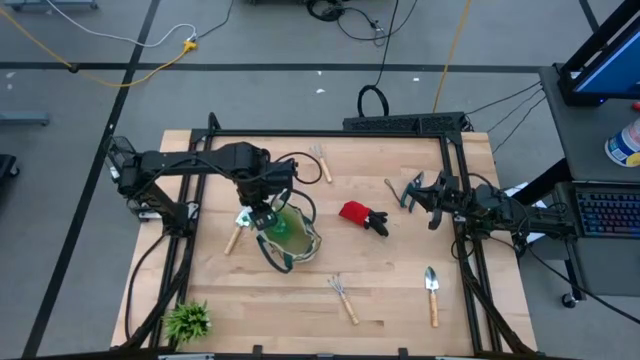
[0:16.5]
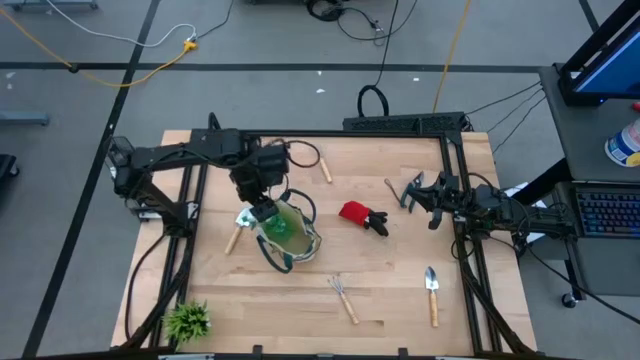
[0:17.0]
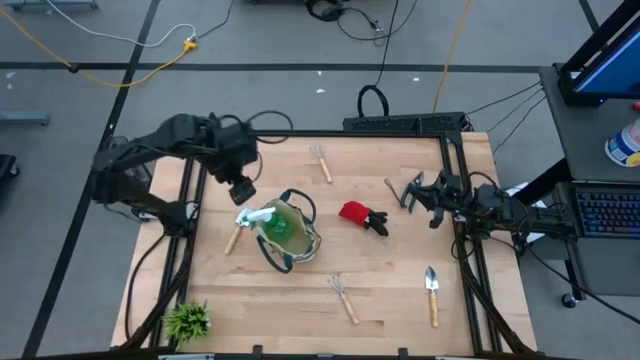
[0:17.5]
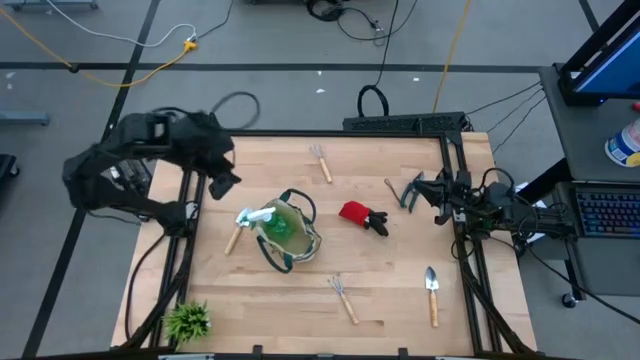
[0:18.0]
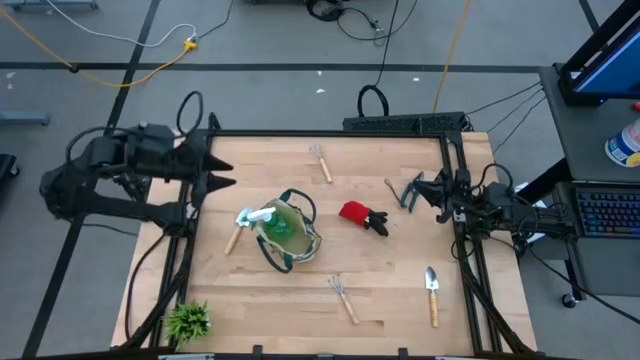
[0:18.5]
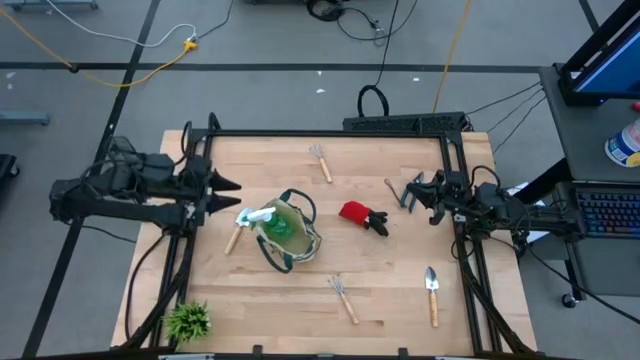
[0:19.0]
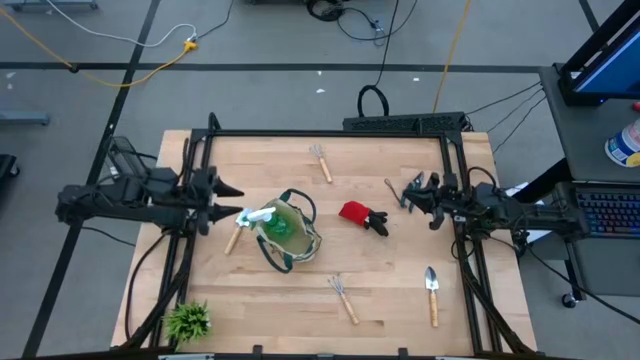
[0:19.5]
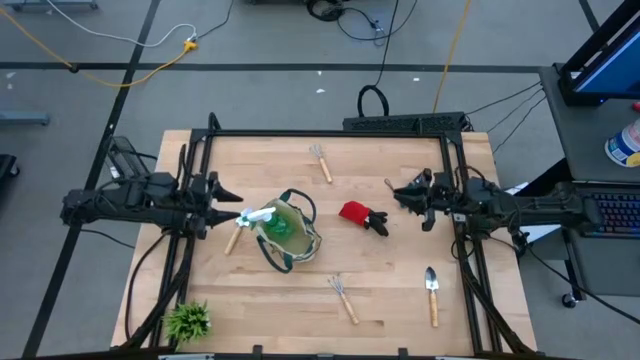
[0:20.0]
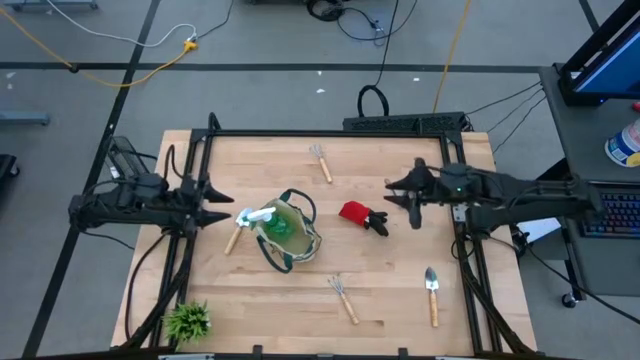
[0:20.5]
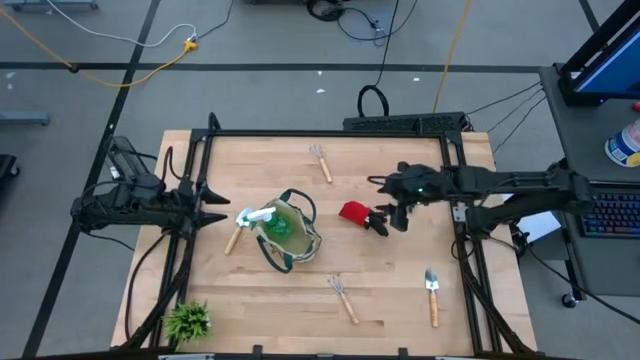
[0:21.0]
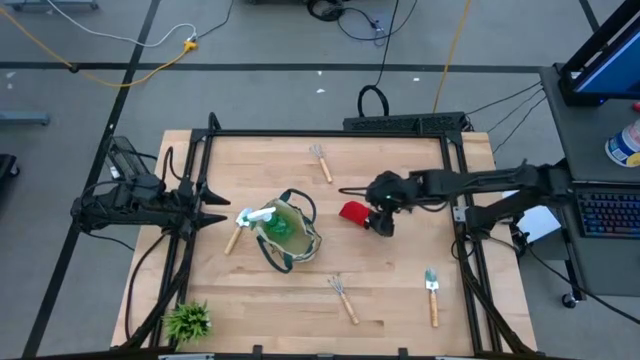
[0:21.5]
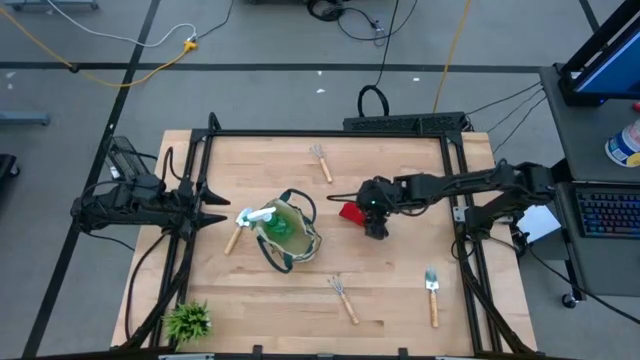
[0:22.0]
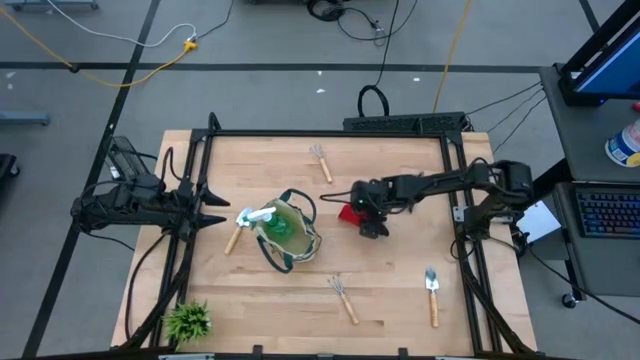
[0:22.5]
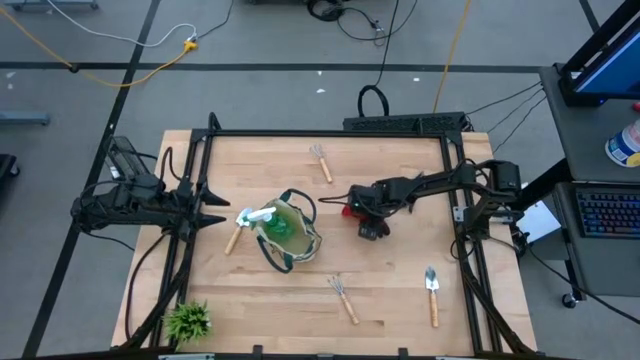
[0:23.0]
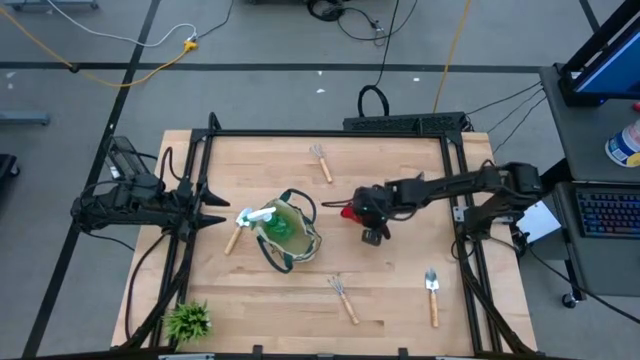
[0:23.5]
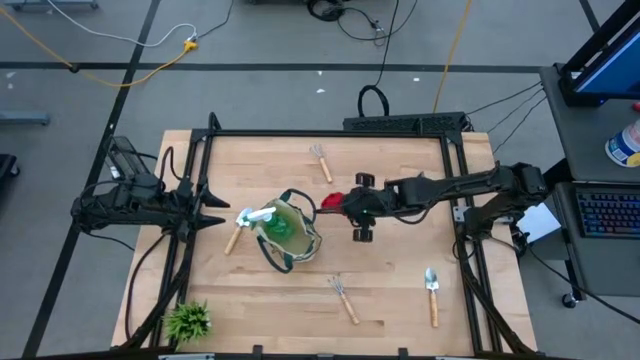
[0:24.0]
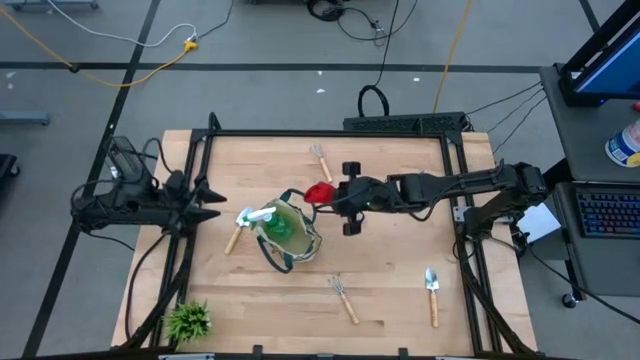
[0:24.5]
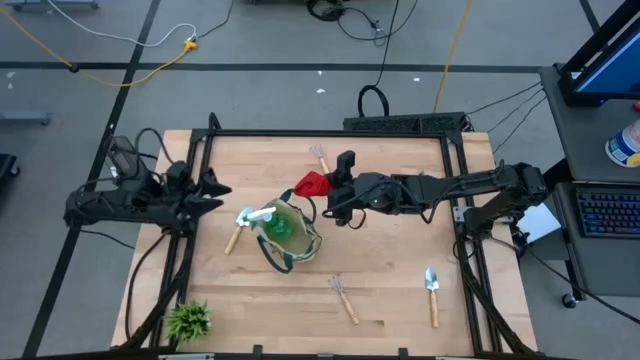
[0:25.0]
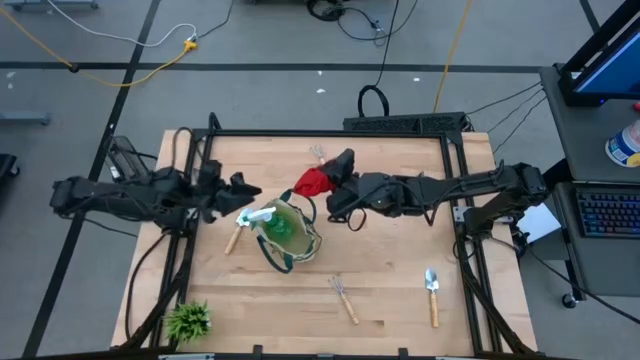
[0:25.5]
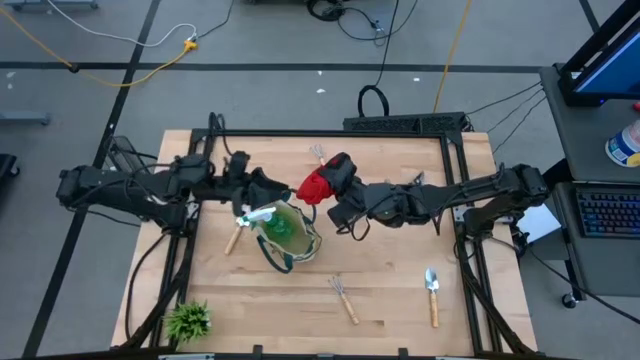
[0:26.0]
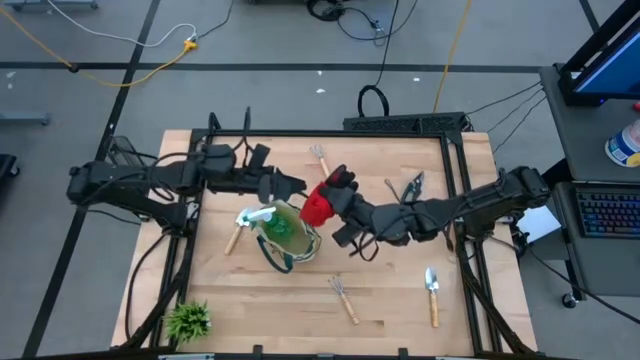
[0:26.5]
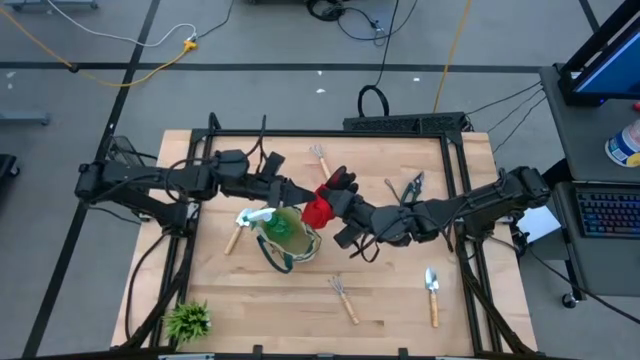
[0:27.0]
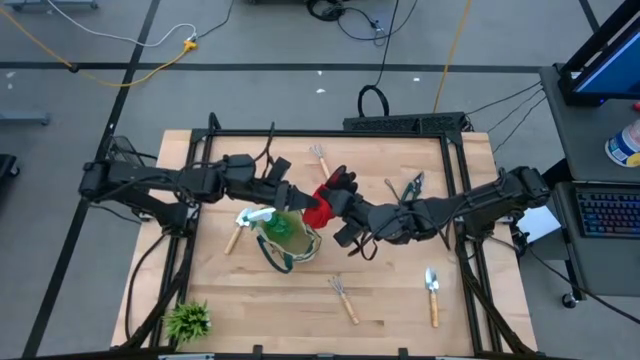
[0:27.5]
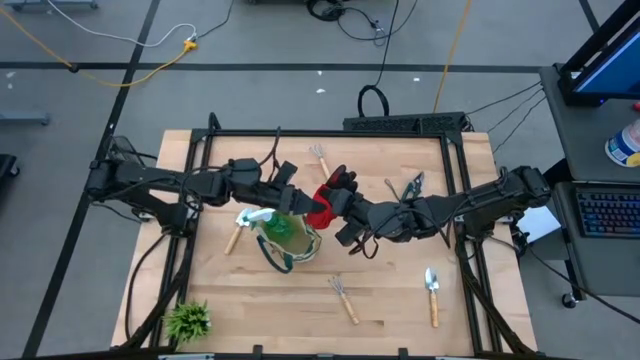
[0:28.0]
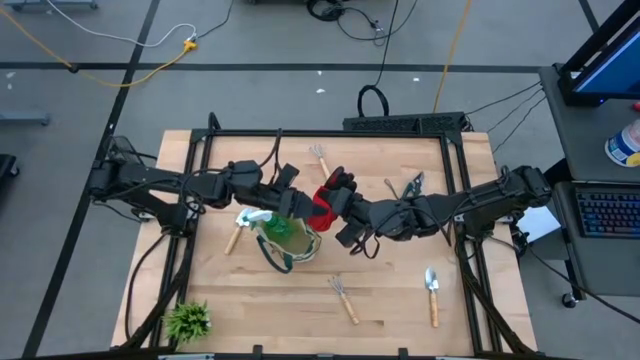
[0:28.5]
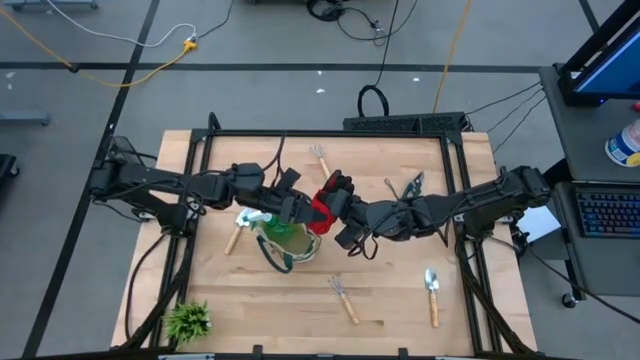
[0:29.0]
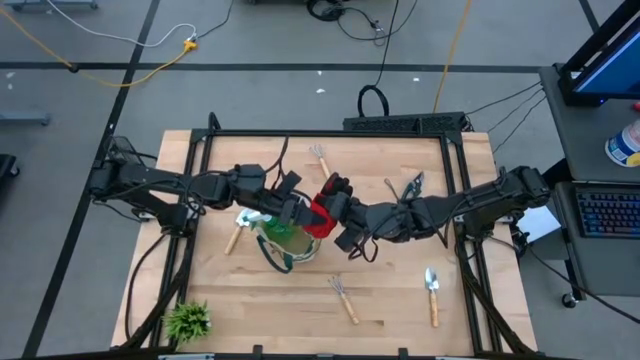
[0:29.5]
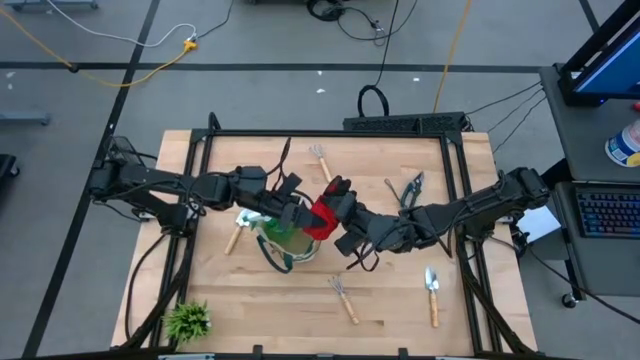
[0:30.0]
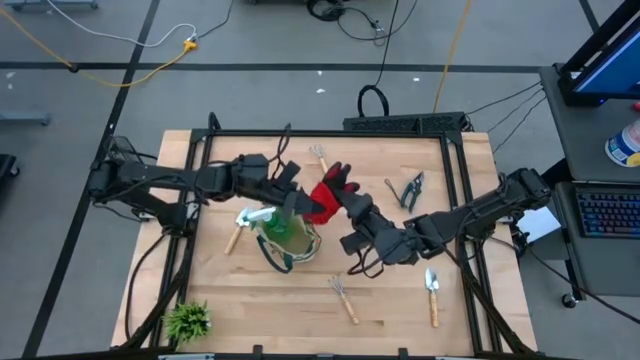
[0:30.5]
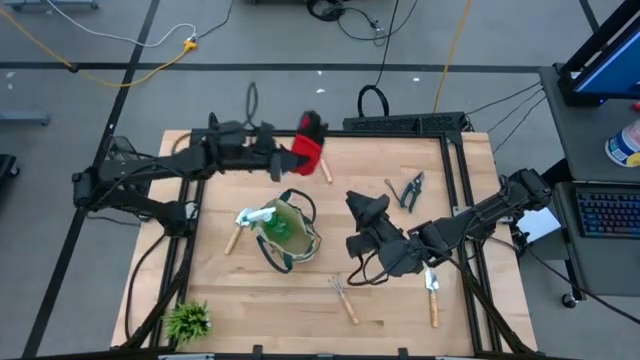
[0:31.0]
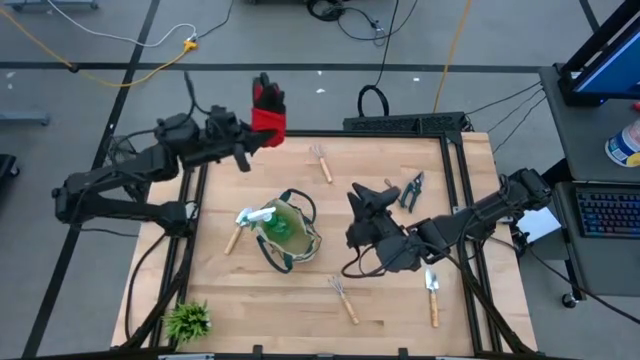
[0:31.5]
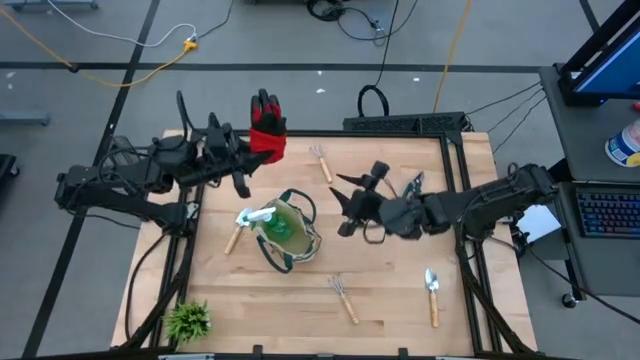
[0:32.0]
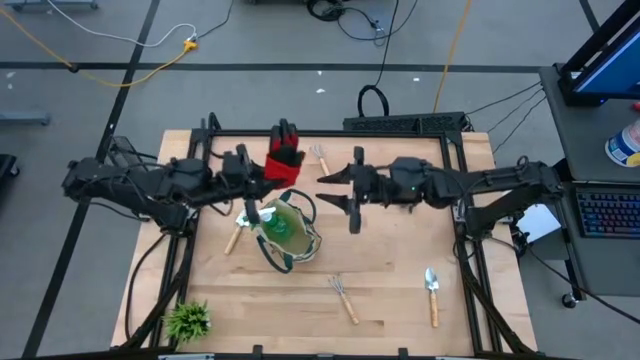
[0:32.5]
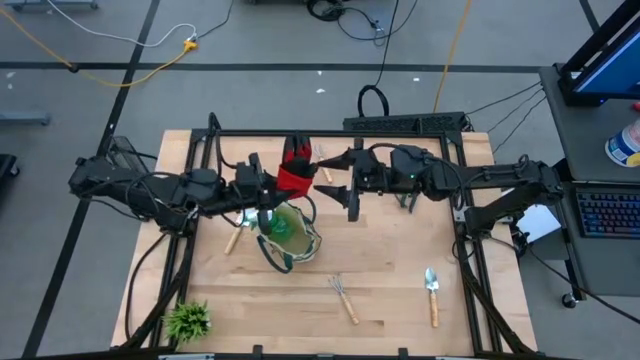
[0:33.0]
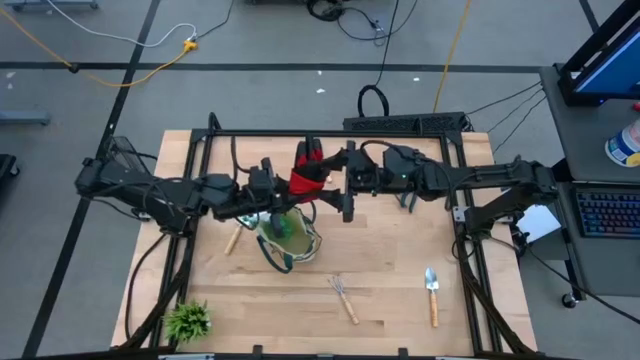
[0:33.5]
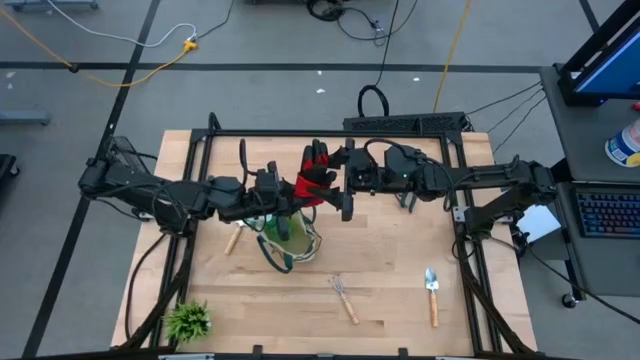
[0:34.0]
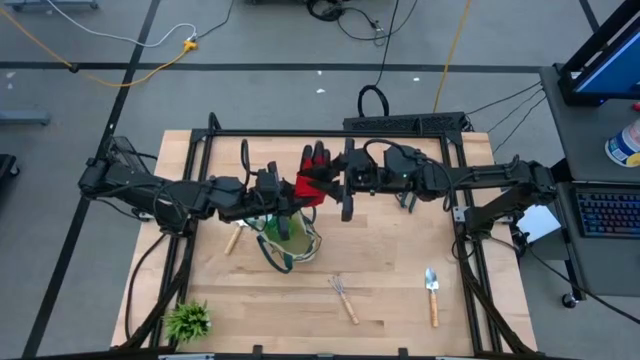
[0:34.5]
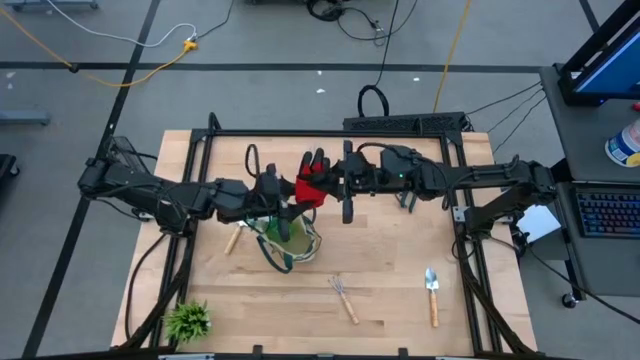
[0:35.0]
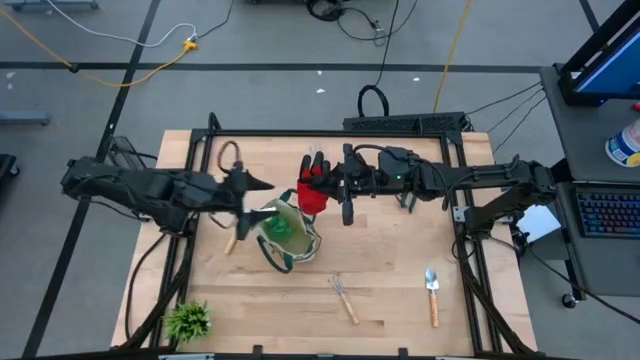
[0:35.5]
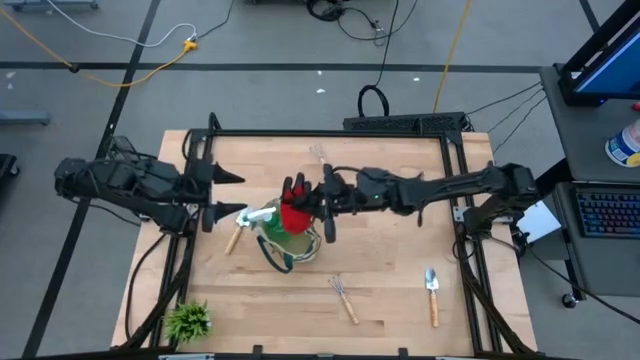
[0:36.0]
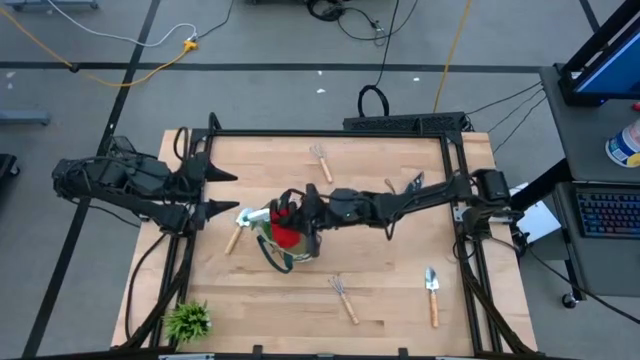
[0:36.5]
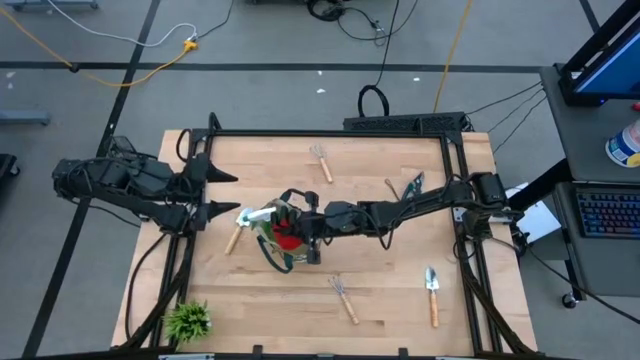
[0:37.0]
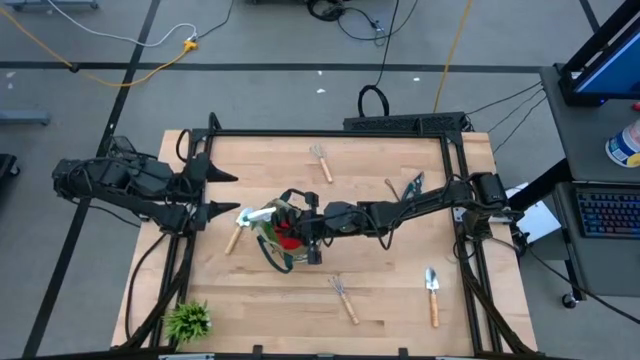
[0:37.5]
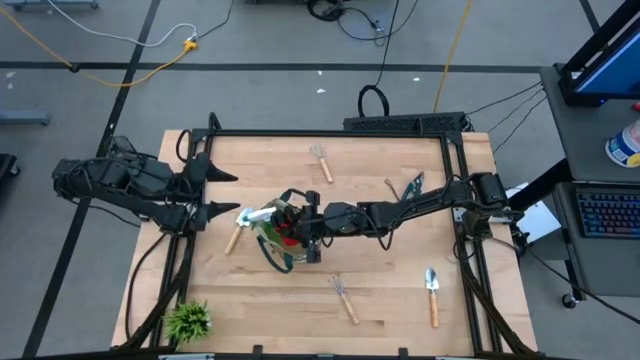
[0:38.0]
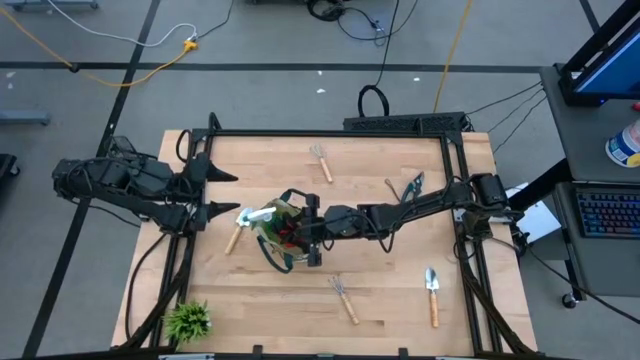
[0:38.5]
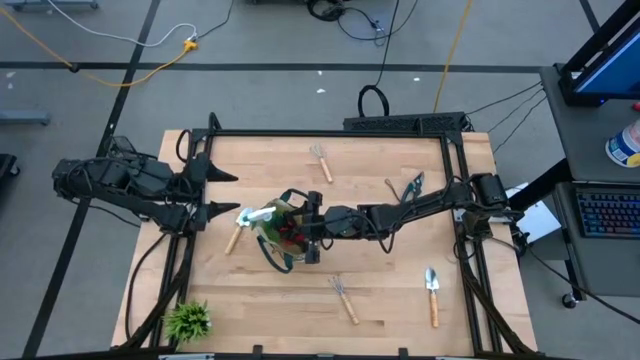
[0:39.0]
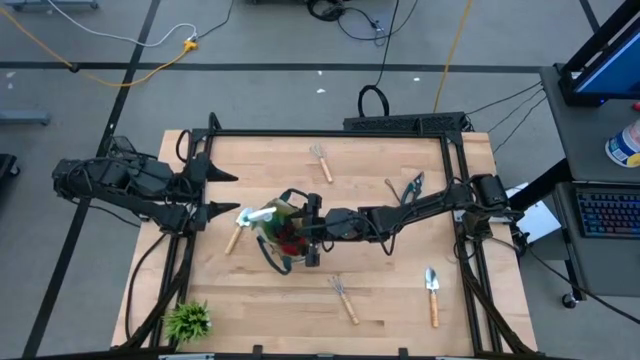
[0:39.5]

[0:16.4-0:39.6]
Task: Pick & Place Garden tools in Gardening bag
Put the gloves into the gardening bag
